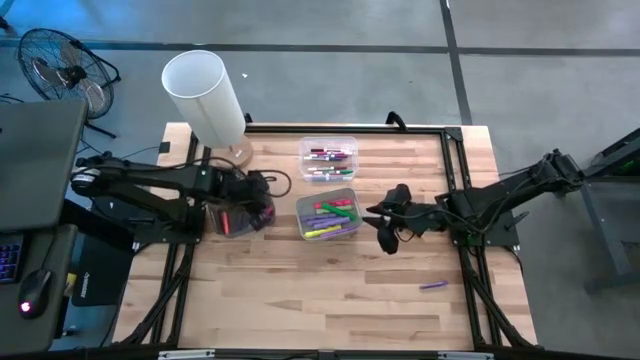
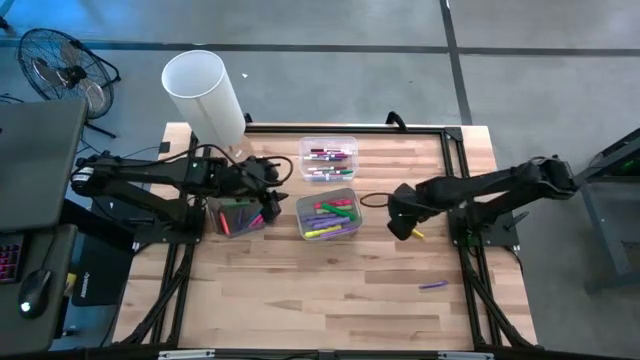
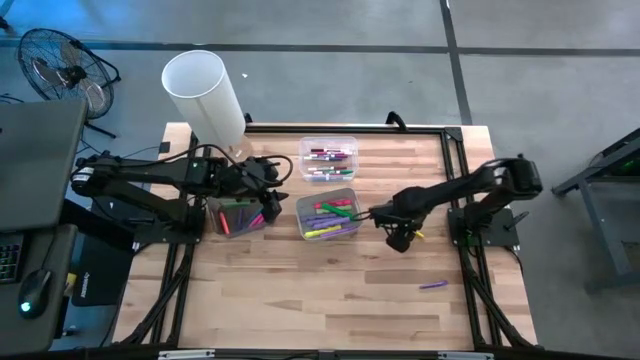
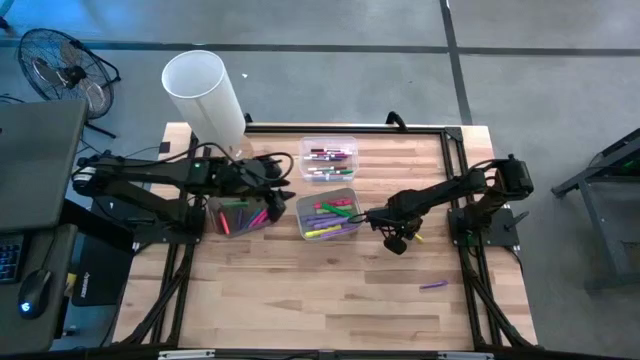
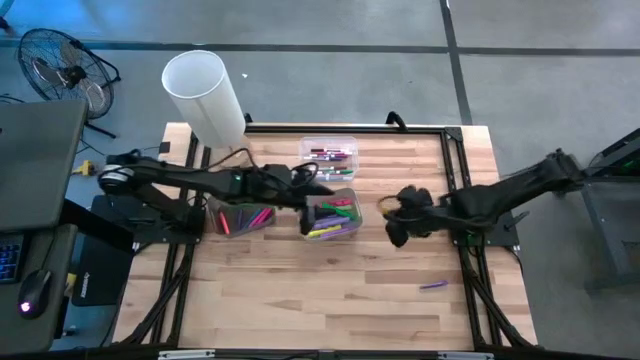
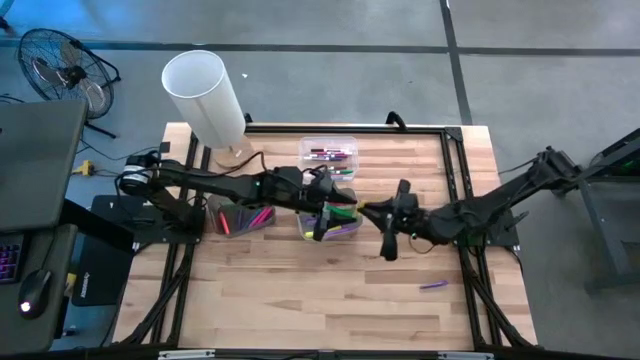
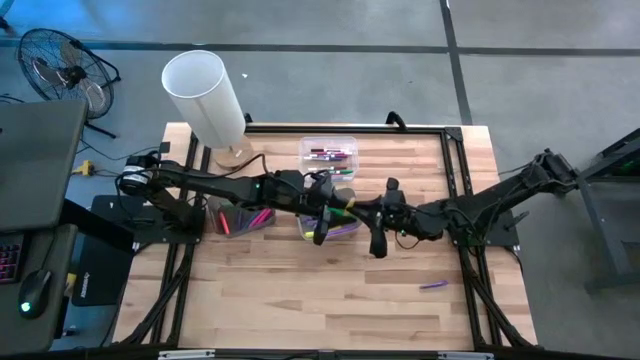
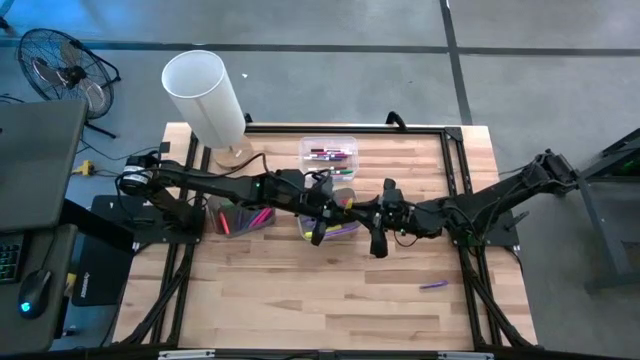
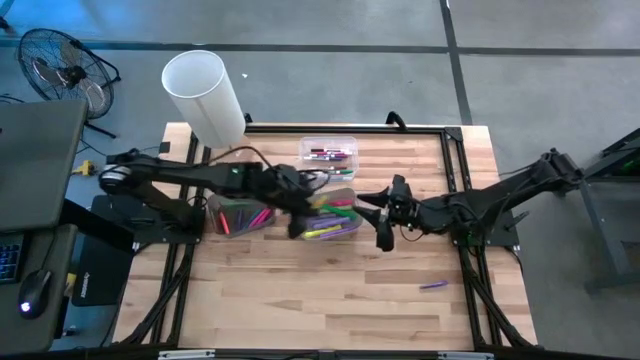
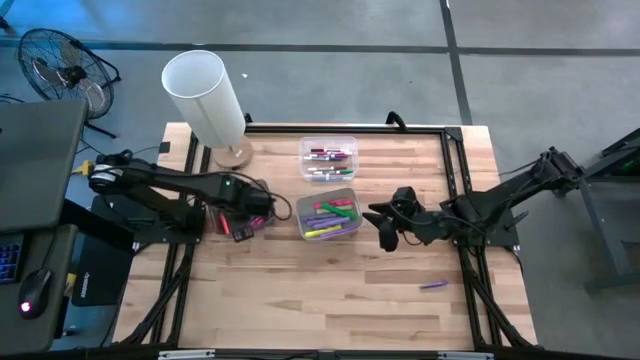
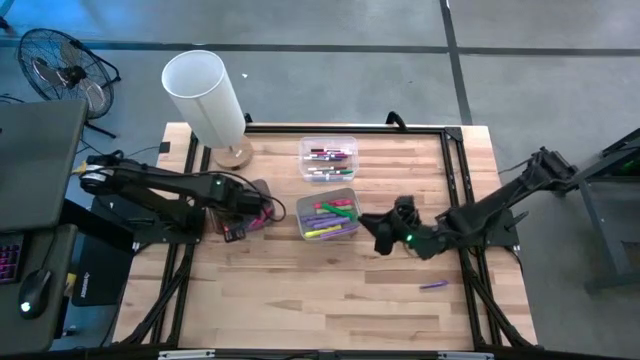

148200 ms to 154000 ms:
Task: Pick & Place Markers
Put the yellow pen into the black bin

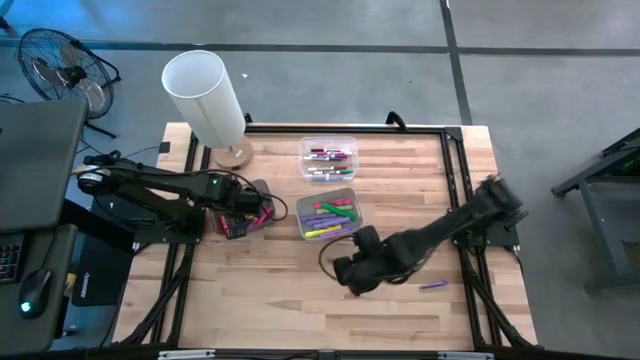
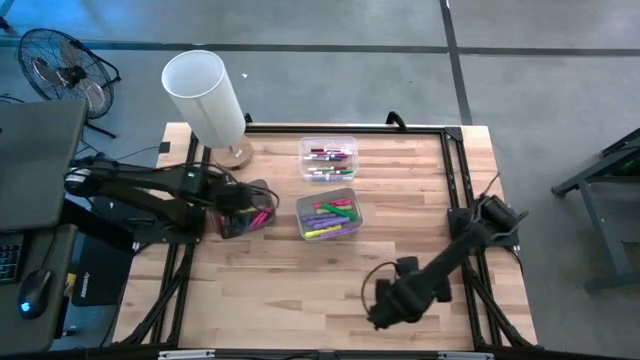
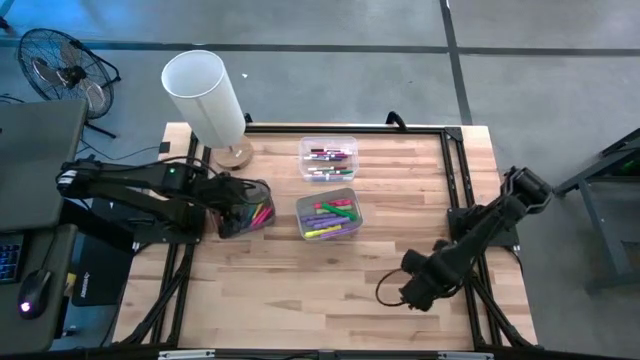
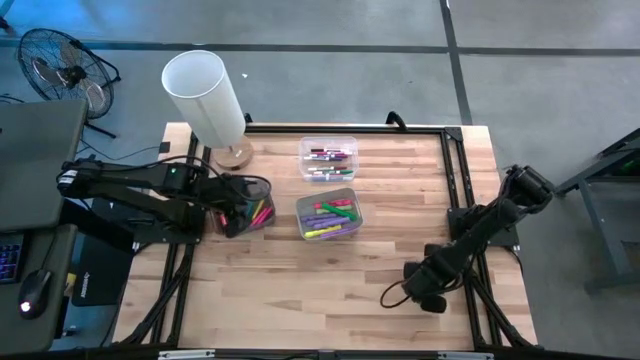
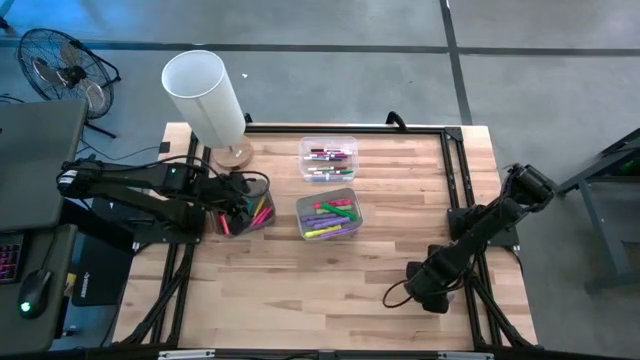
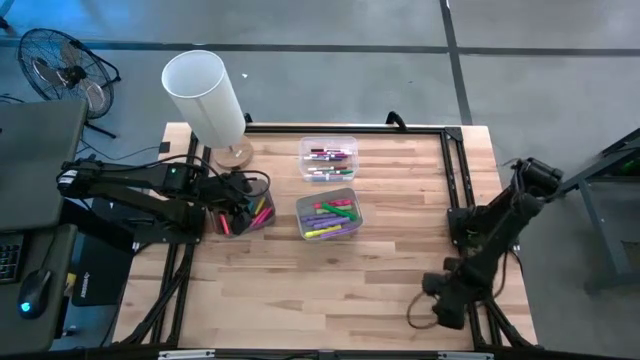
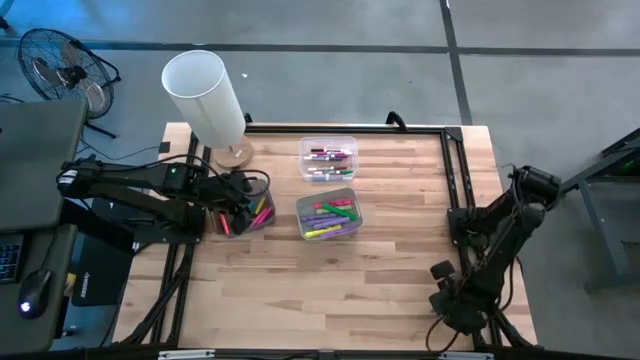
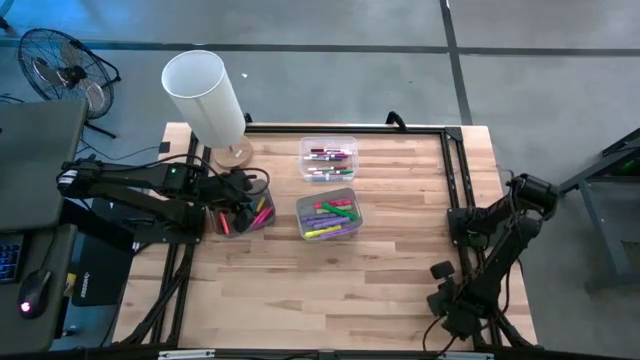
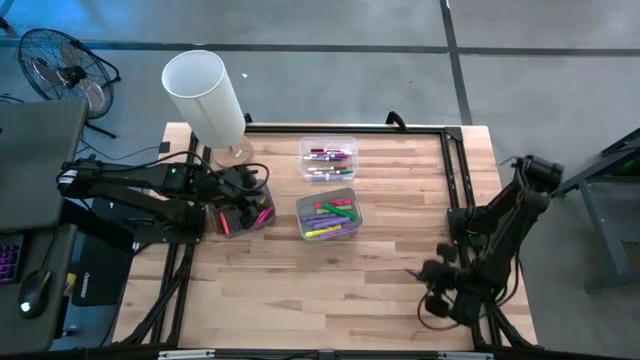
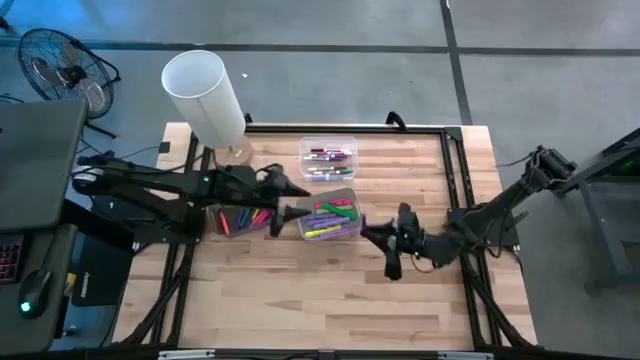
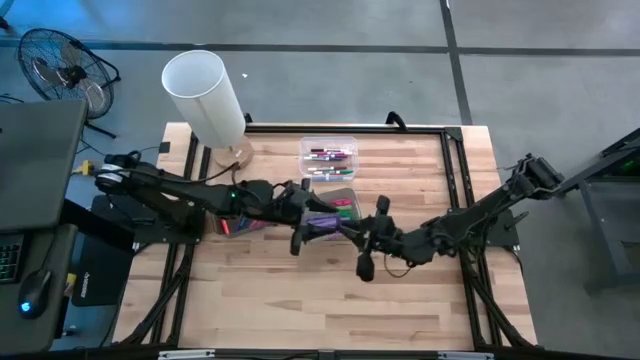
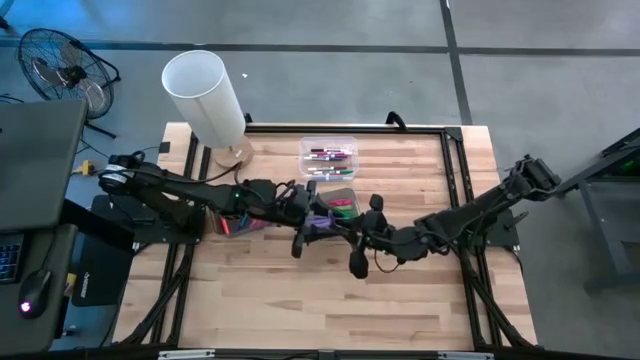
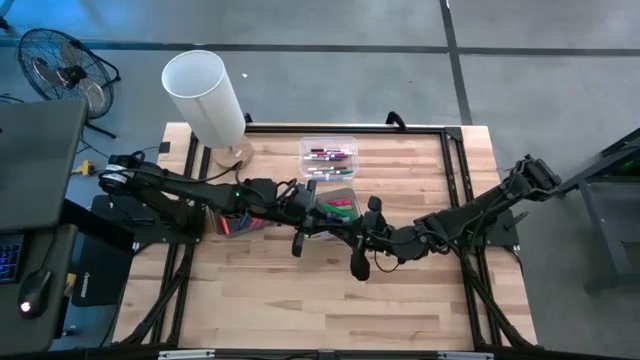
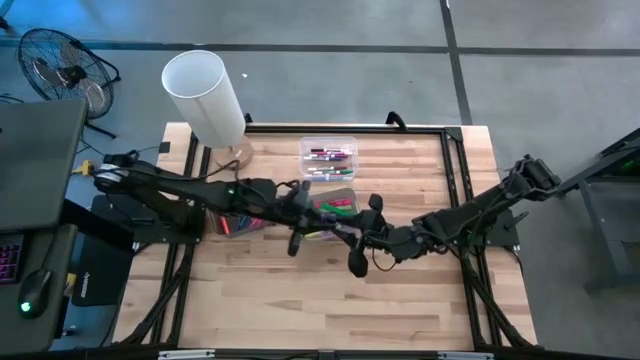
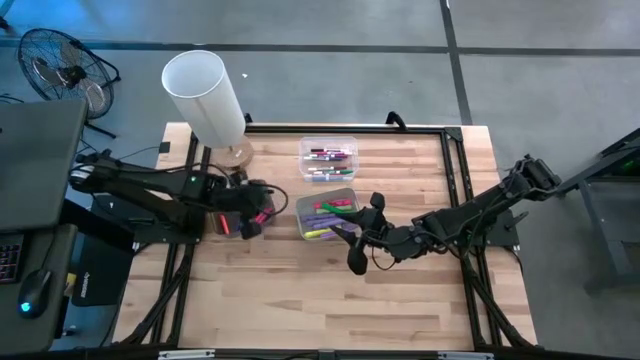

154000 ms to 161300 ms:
Put the violet pen into the black bin

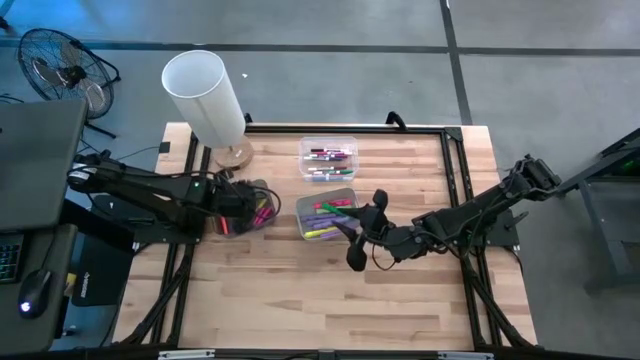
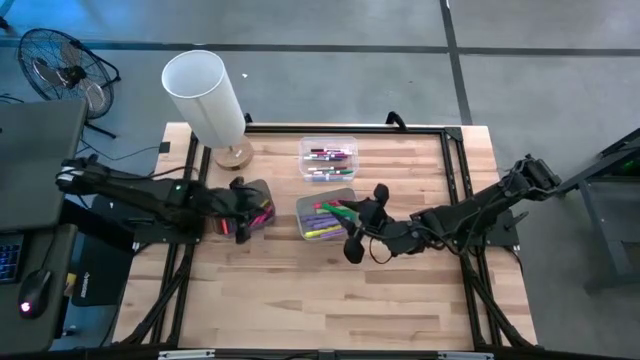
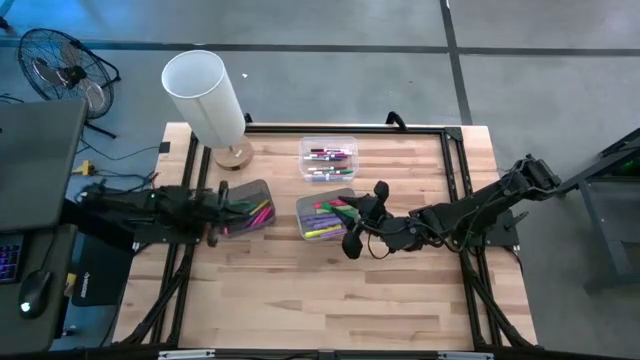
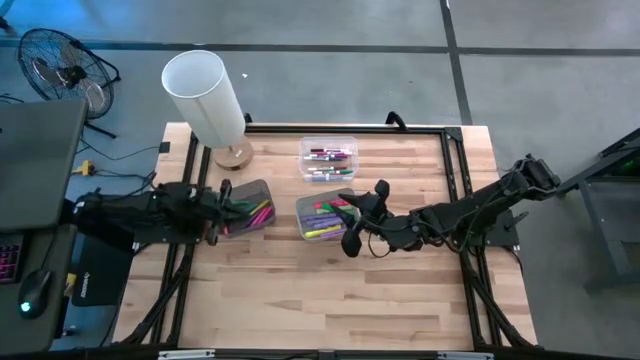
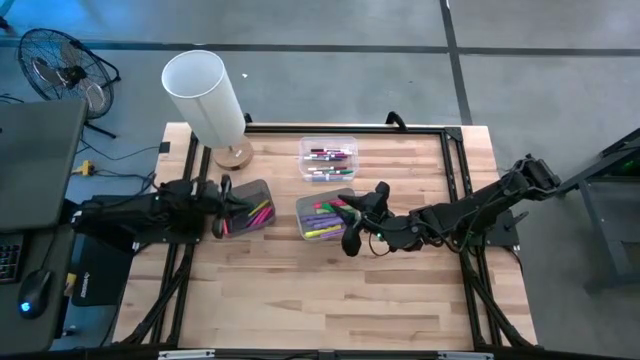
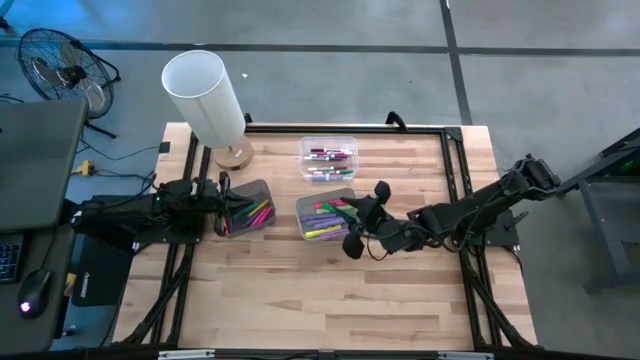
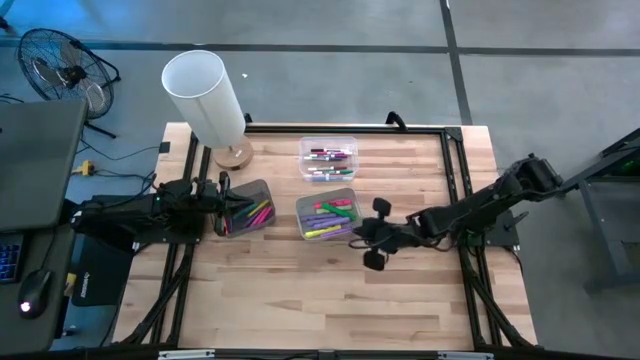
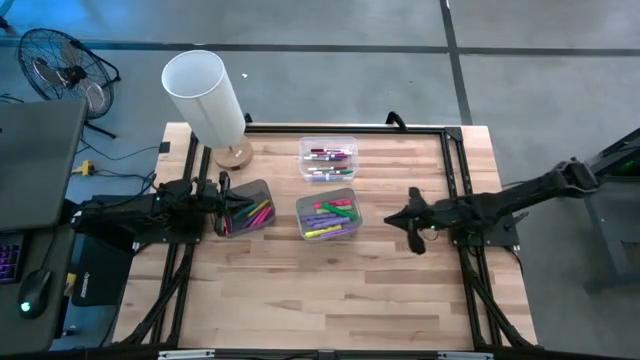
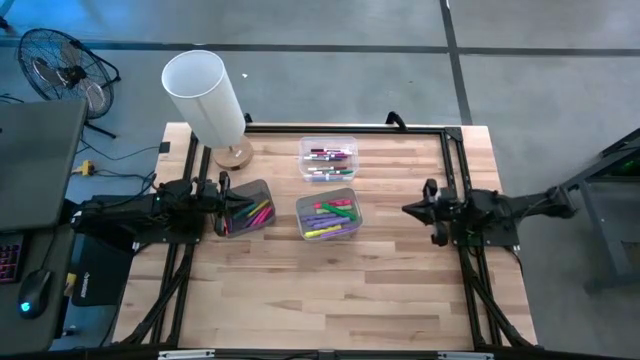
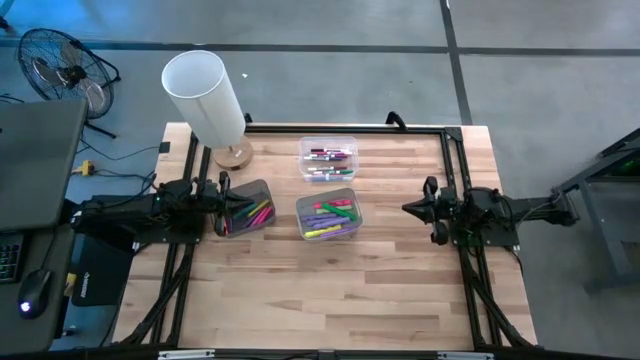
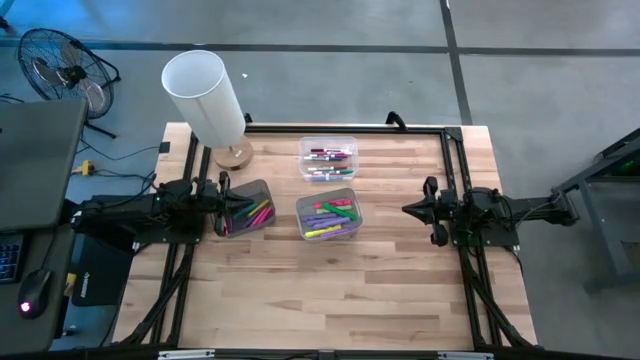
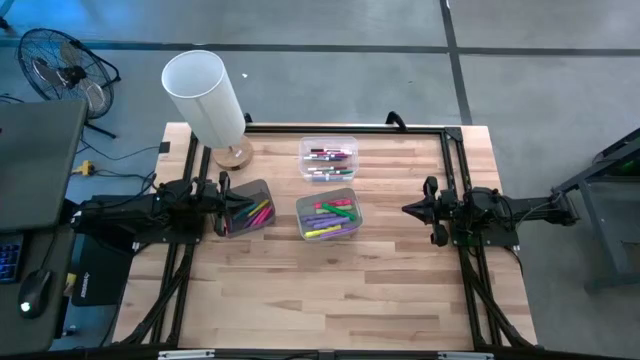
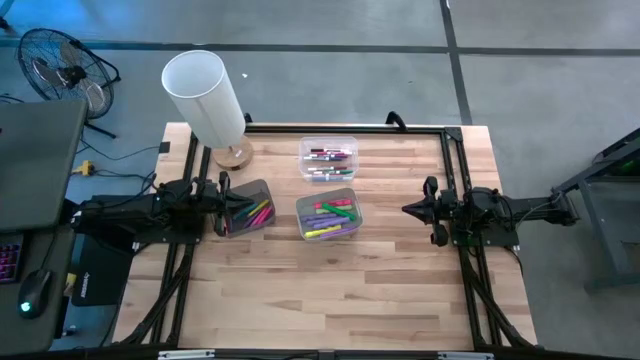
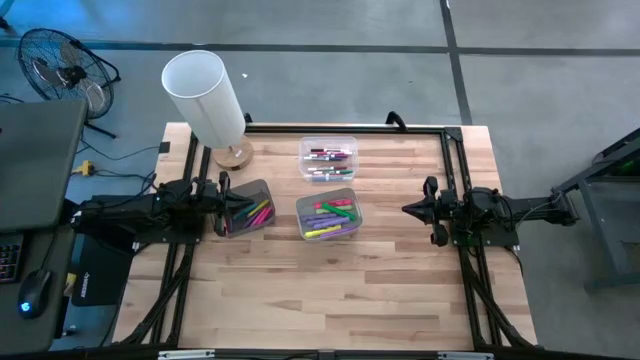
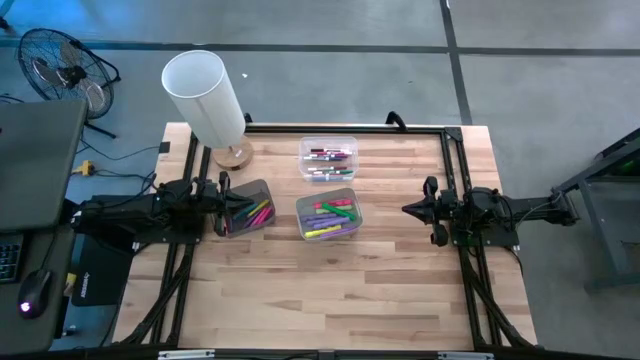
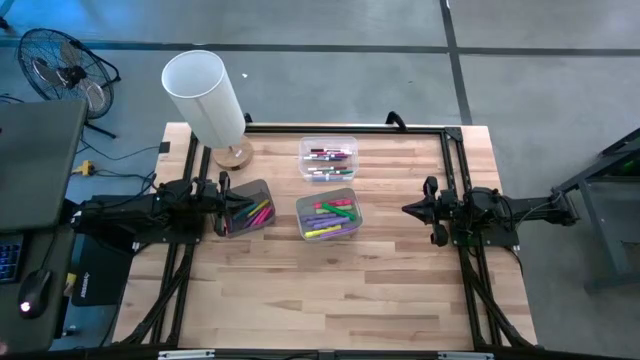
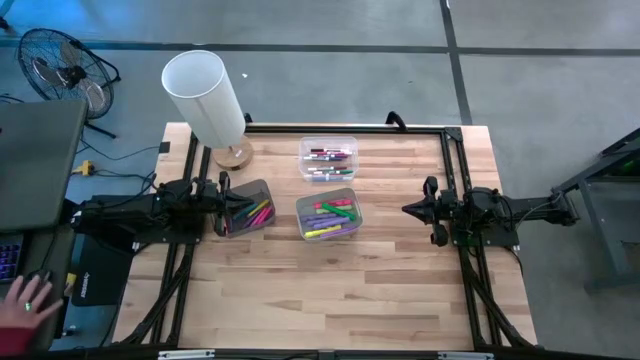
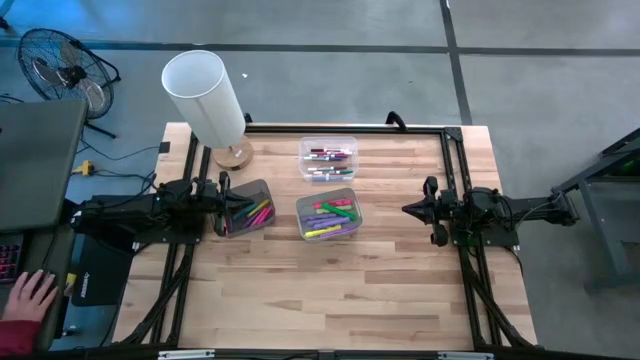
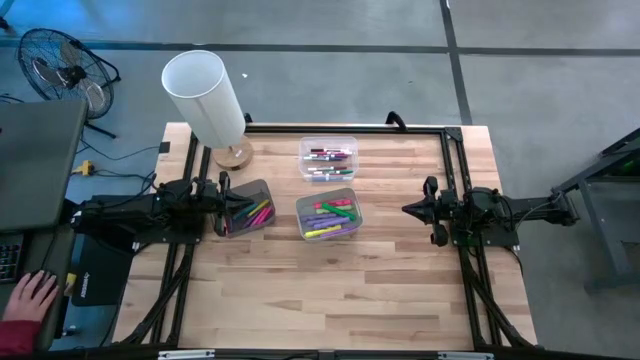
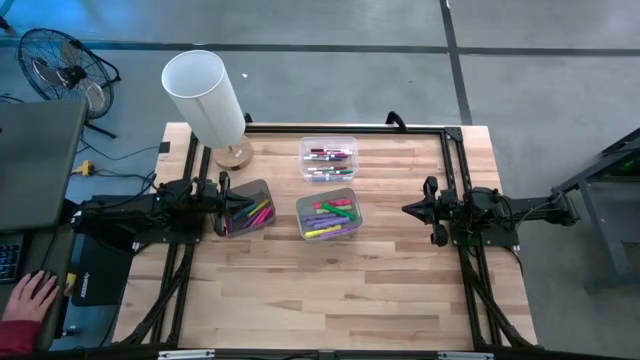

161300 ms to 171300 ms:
Return to Home Position
